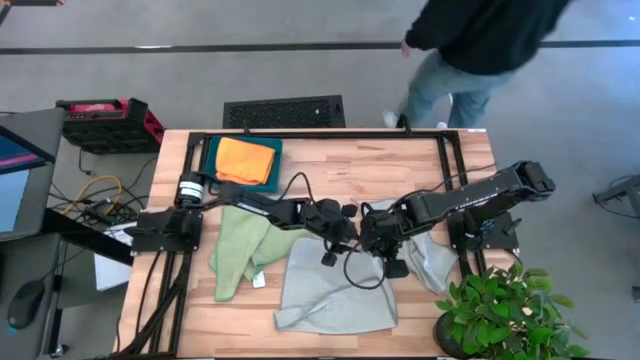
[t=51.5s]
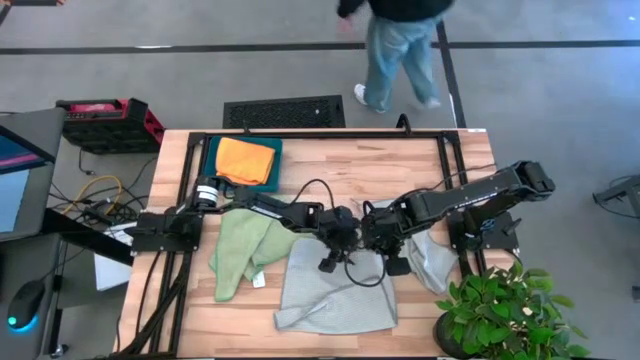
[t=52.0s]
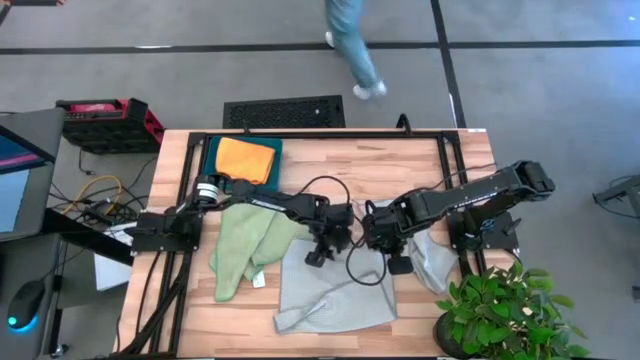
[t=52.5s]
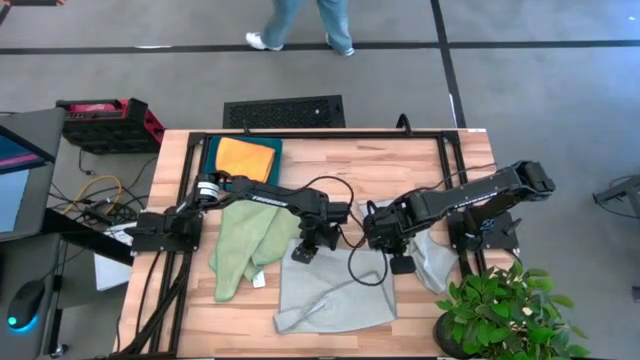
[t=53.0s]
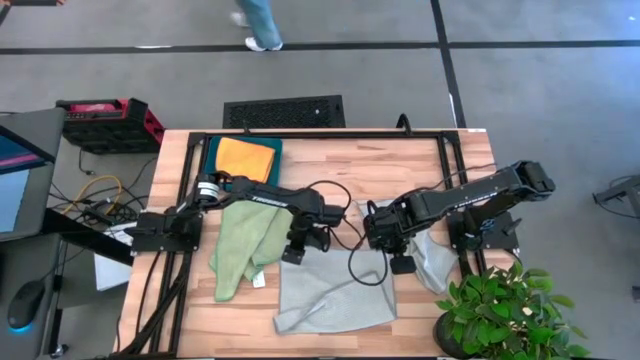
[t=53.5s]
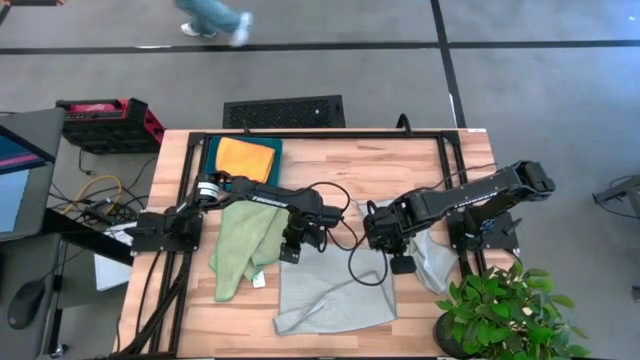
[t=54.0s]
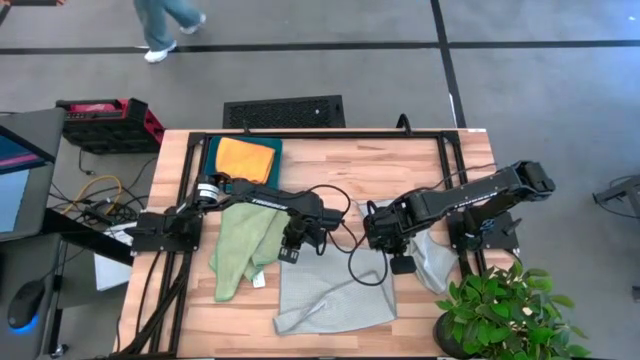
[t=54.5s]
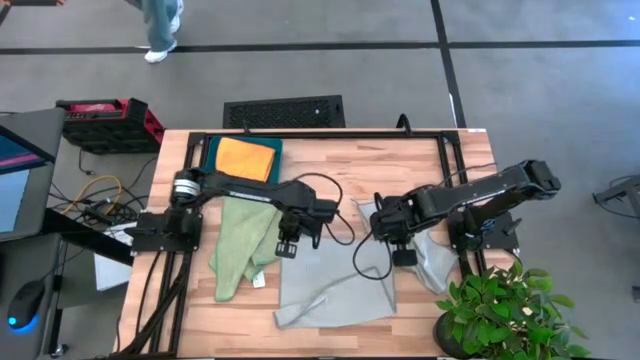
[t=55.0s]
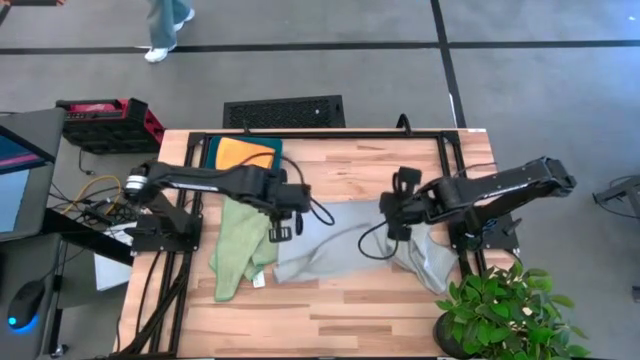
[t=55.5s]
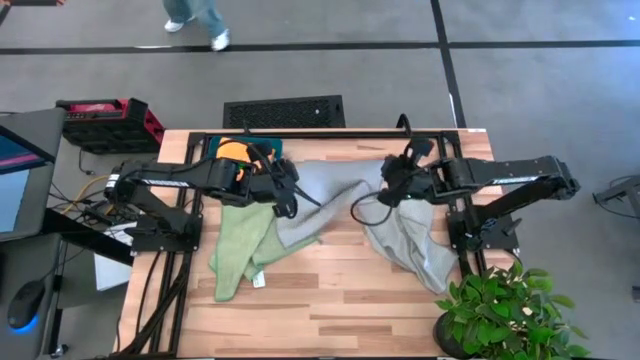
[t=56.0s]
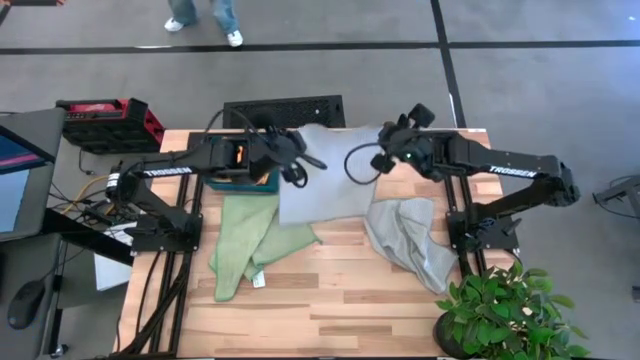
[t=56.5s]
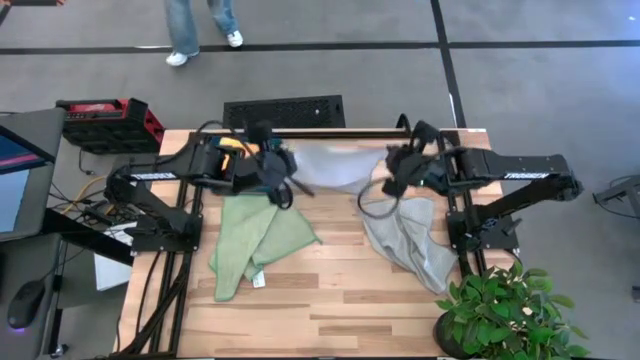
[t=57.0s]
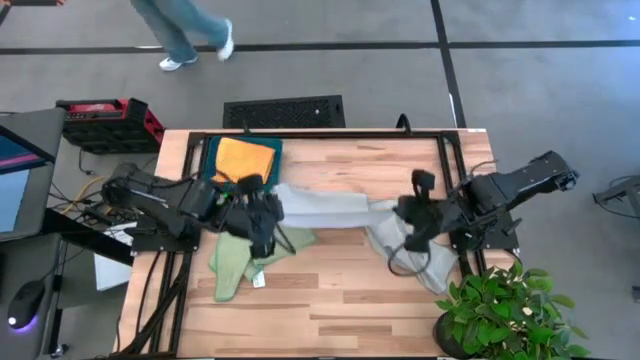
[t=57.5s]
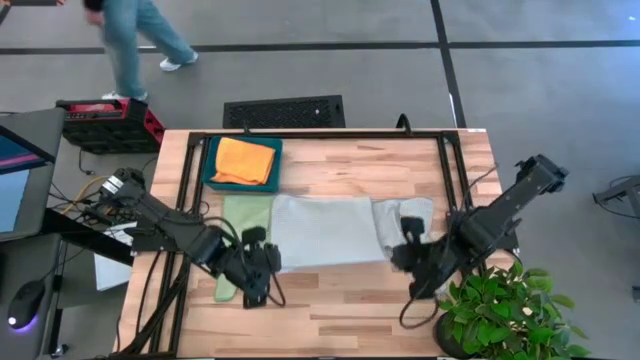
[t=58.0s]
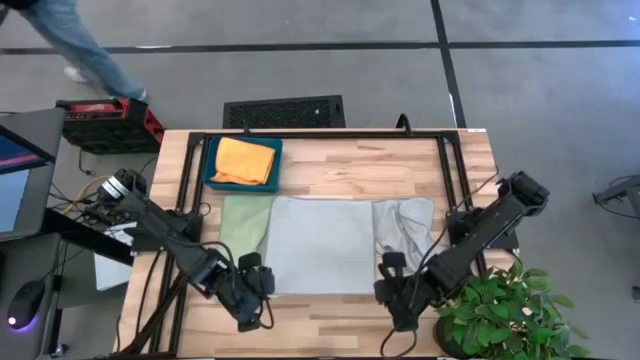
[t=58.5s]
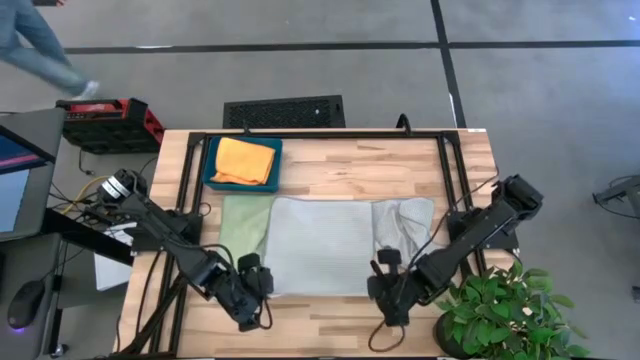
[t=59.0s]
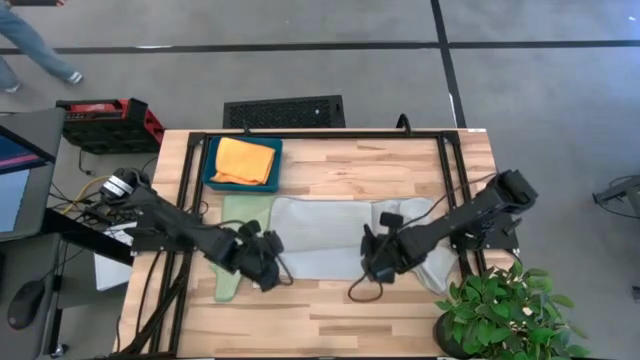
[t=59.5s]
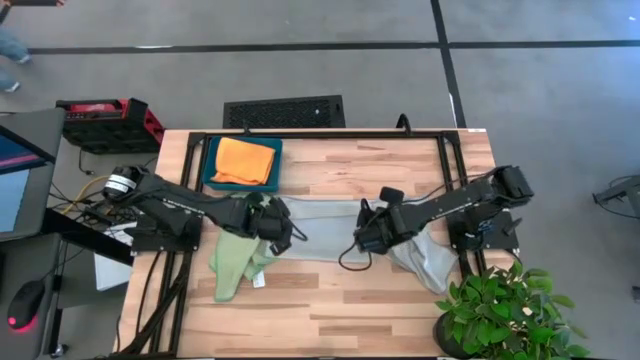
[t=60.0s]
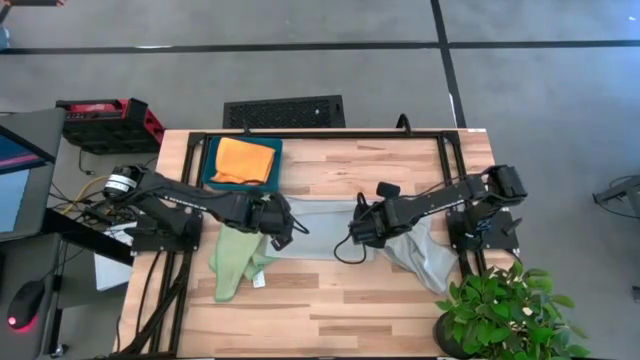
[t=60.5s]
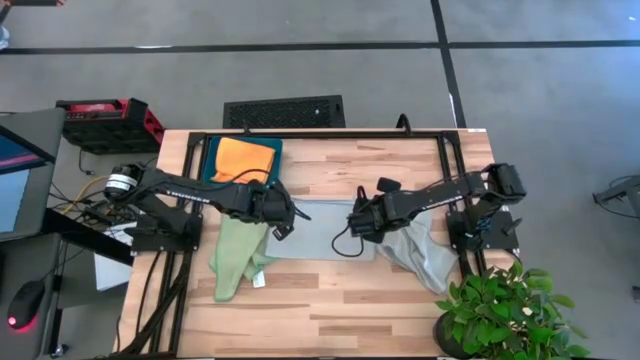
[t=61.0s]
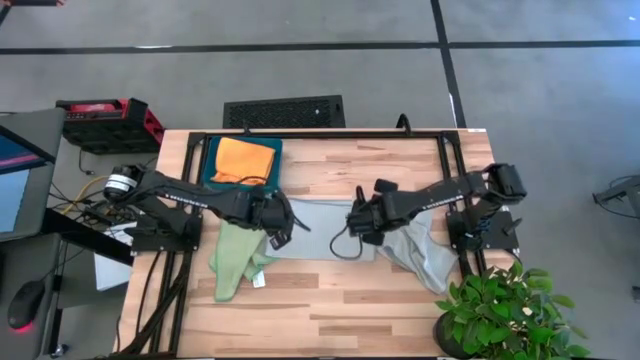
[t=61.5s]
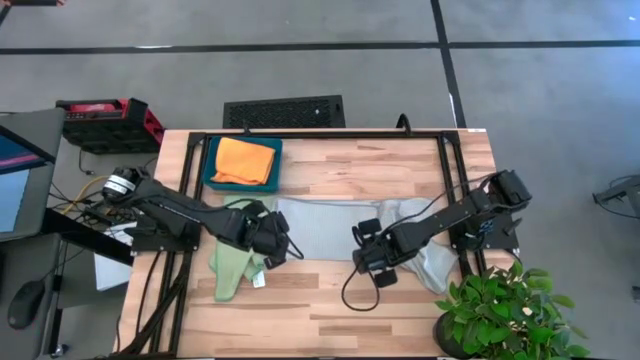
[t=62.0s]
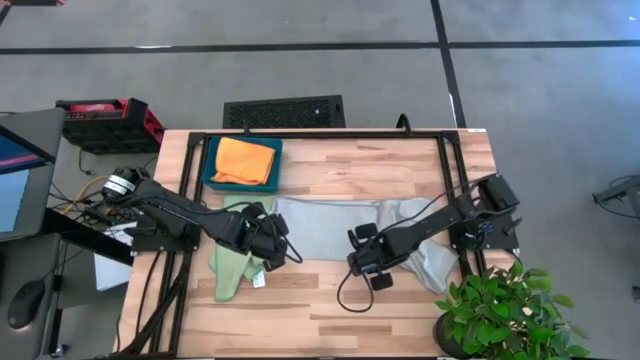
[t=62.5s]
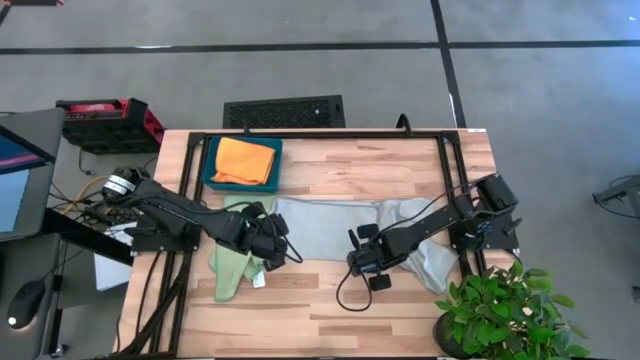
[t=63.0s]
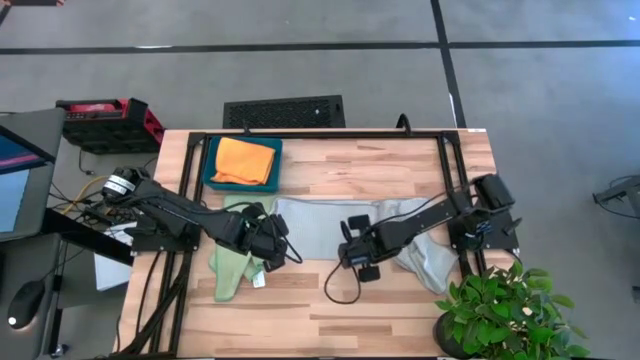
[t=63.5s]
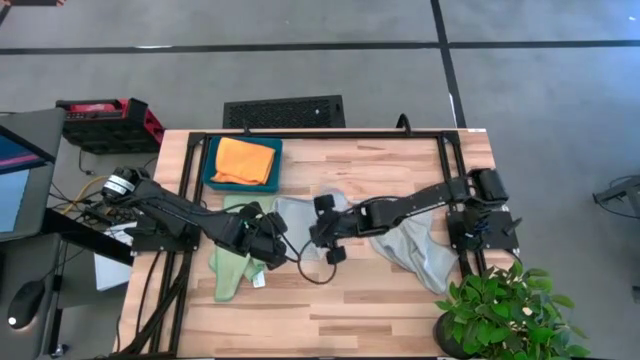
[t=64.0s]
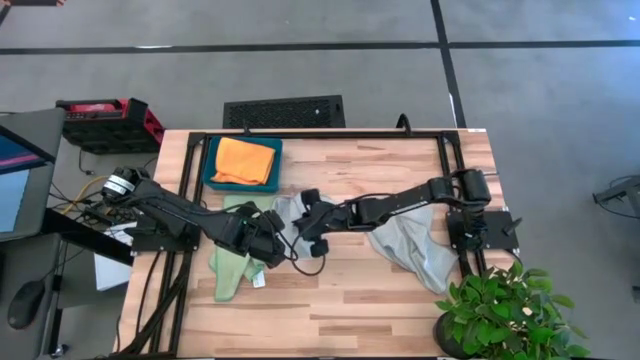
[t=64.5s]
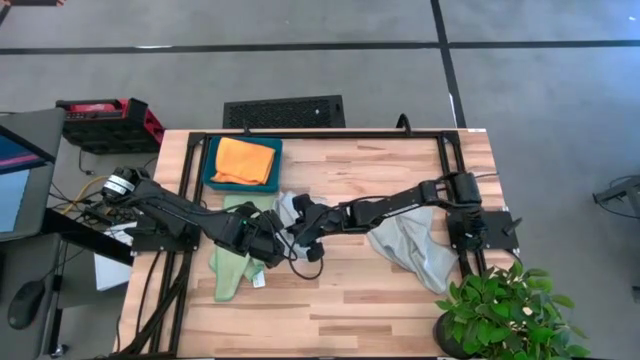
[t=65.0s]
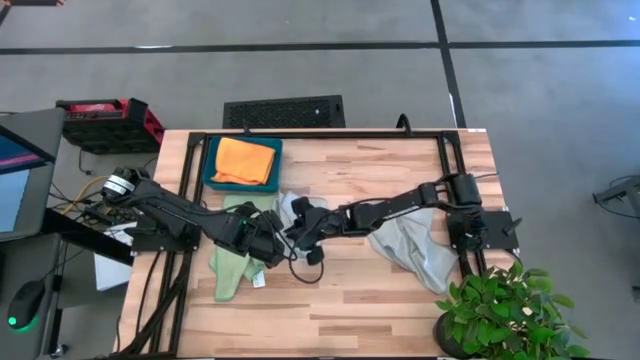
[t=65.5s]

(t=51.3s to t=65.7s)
Task: Fold microfiber towels
Fold the left gray towel

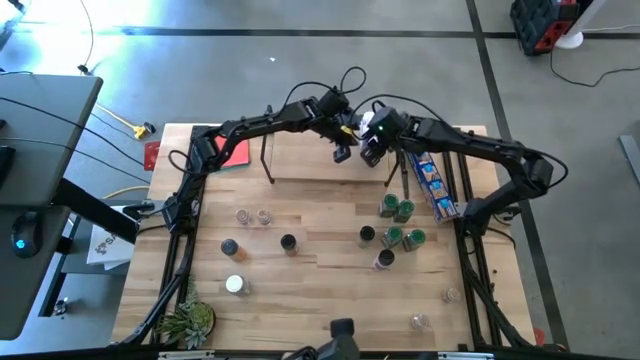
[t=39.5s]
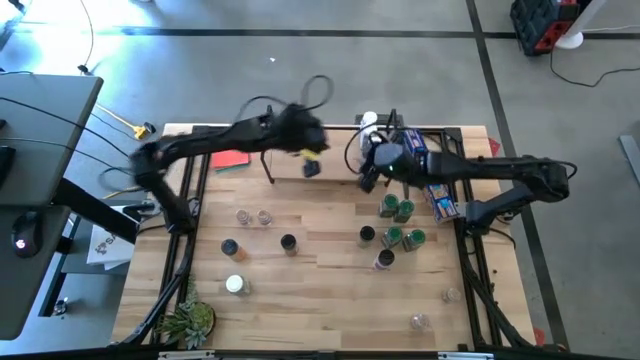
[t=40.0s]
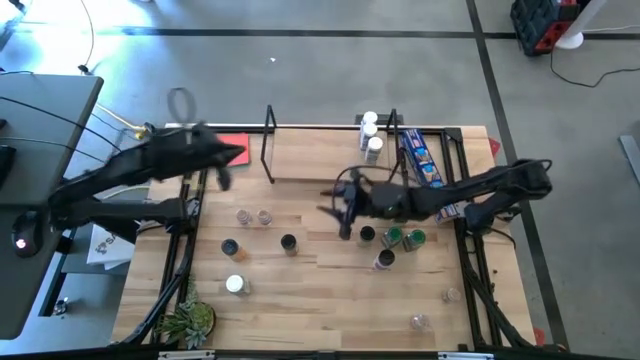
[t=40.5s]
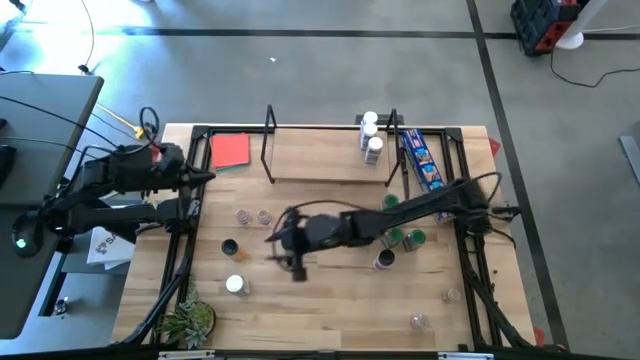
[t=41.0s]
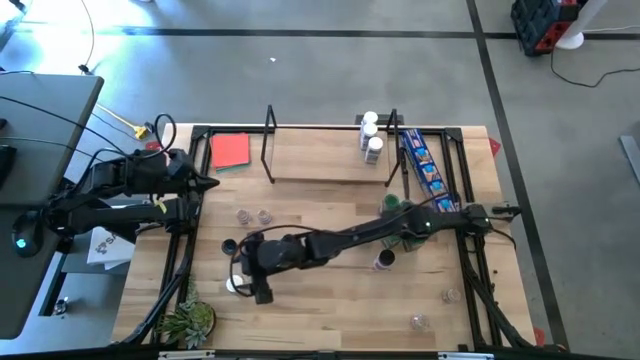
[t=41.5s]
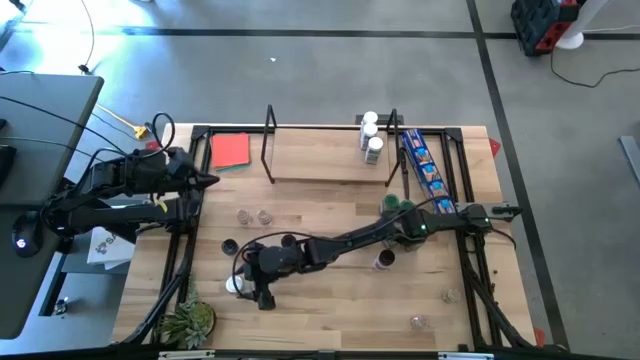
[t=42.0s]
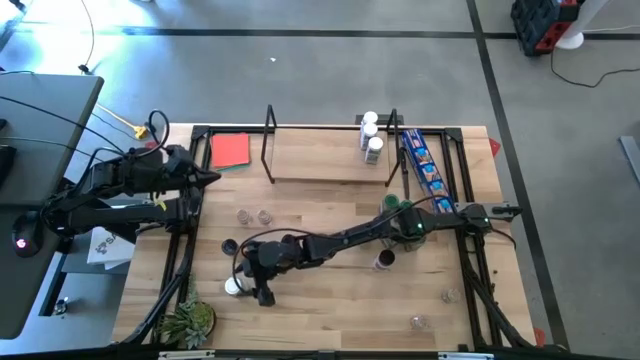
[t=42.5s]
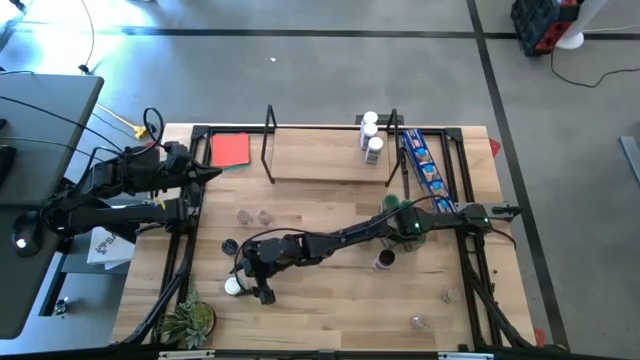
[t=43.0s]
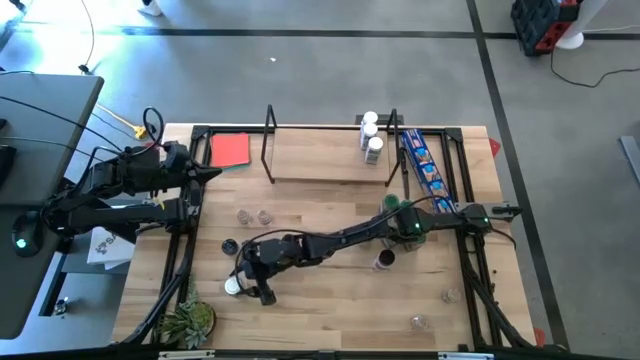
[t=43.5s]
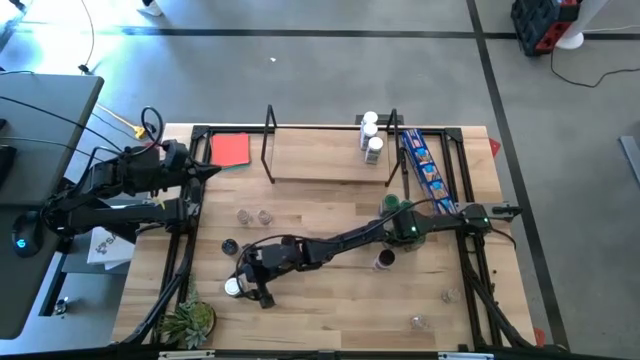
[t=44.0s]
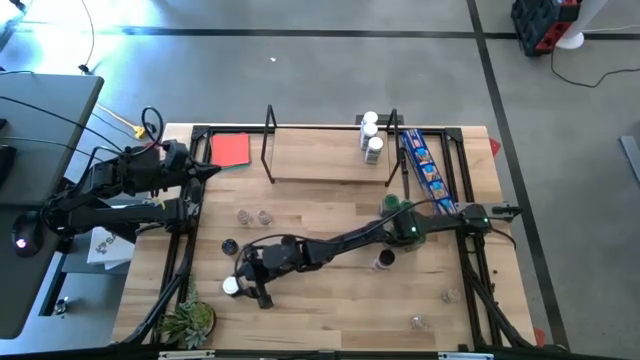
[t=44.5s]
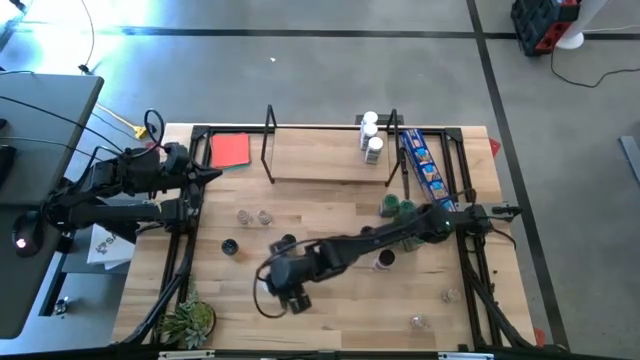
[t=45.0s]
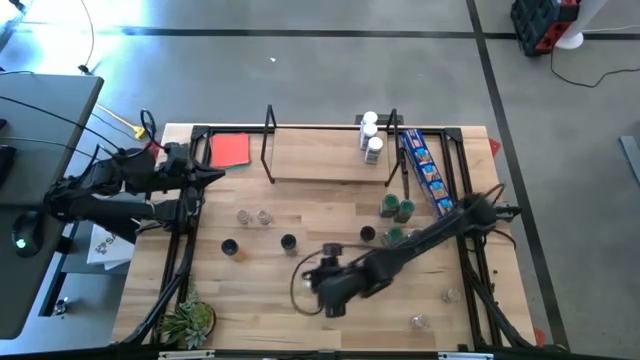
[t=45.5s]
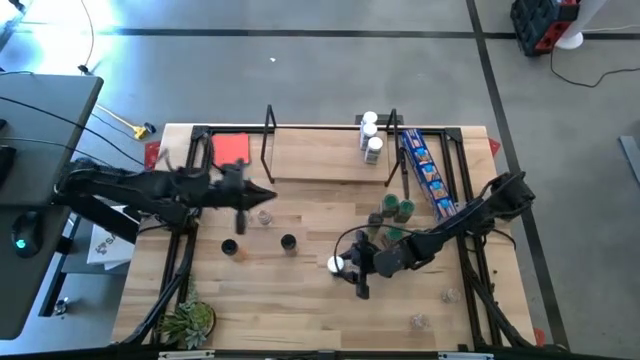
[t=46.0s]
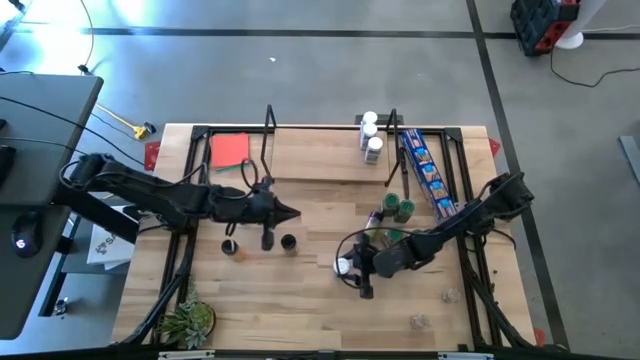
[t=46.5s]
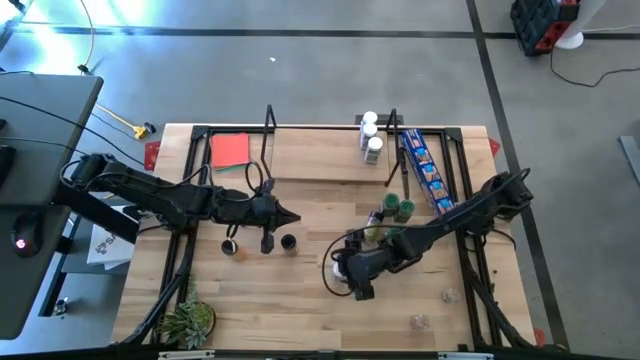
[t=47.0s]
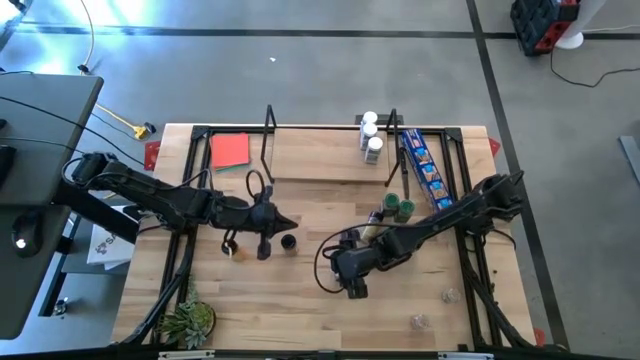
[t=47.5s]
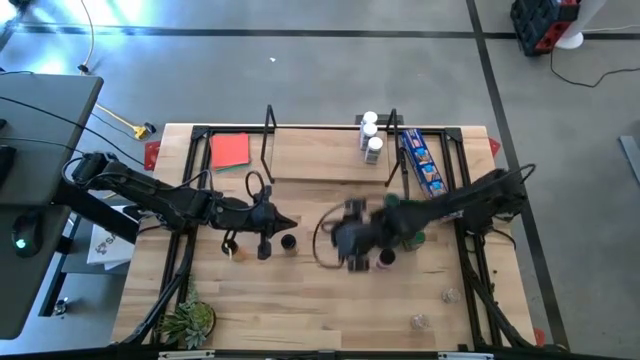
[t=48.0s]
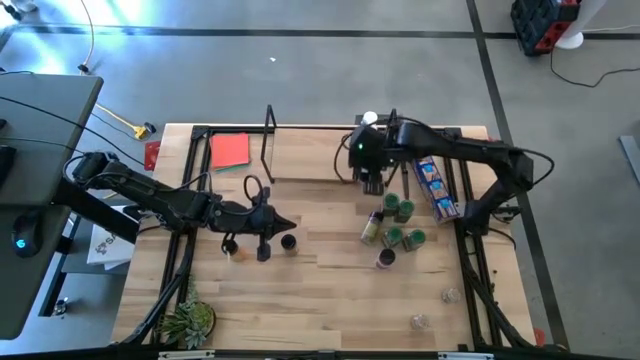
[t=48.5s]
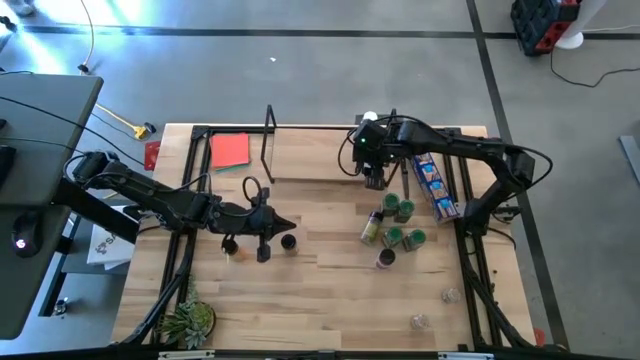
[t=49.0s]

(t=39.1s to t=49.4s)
Task: Shelf spices
Put the white seasoning bottle on the shelf aligned with the other white seasoning bottles
